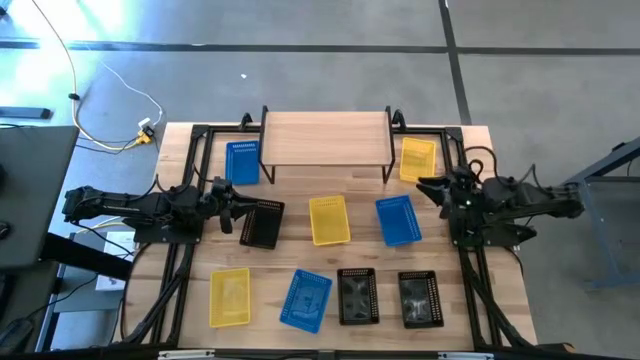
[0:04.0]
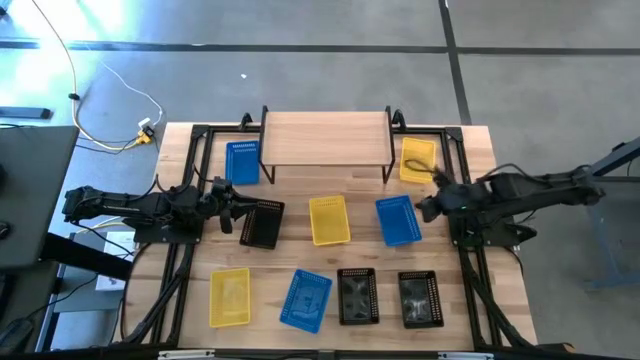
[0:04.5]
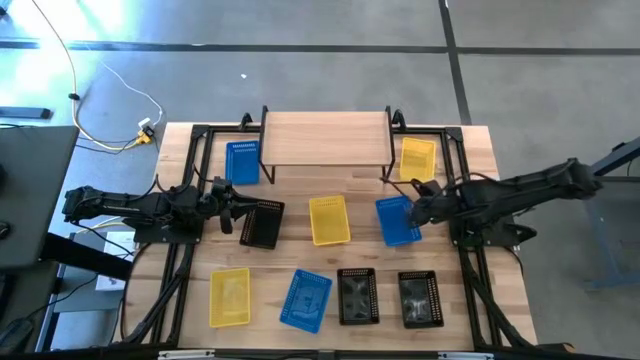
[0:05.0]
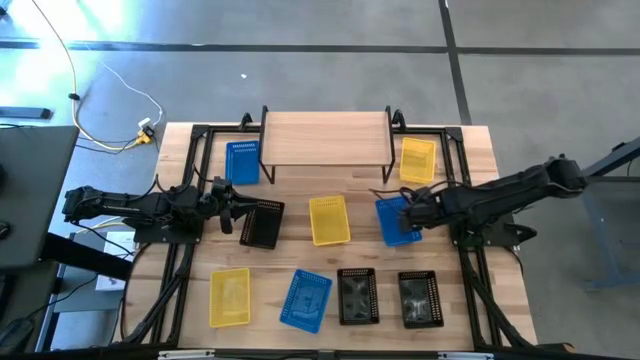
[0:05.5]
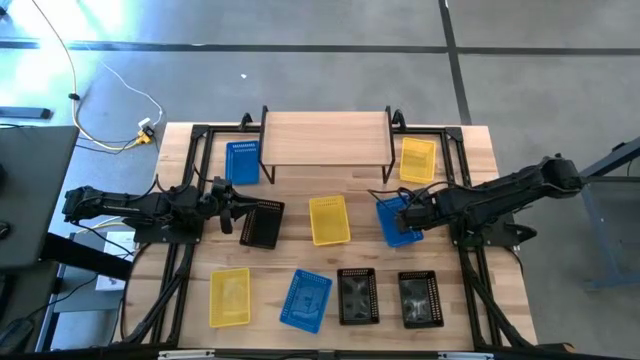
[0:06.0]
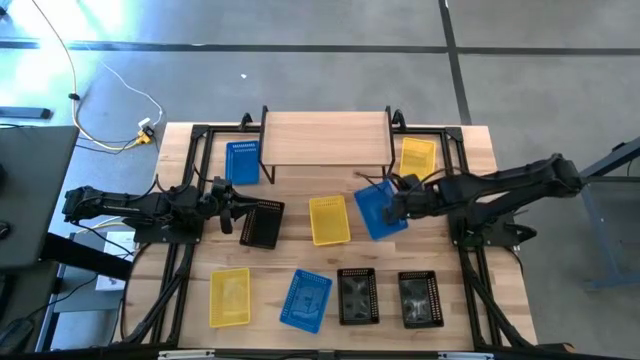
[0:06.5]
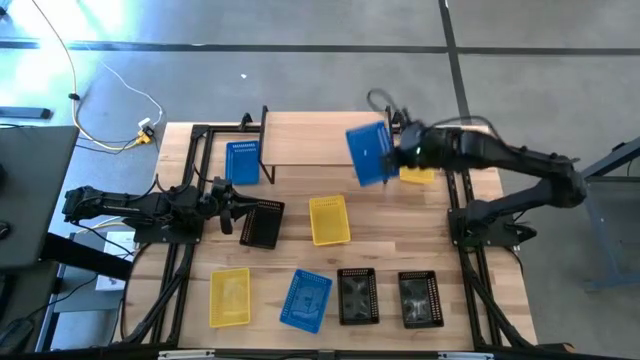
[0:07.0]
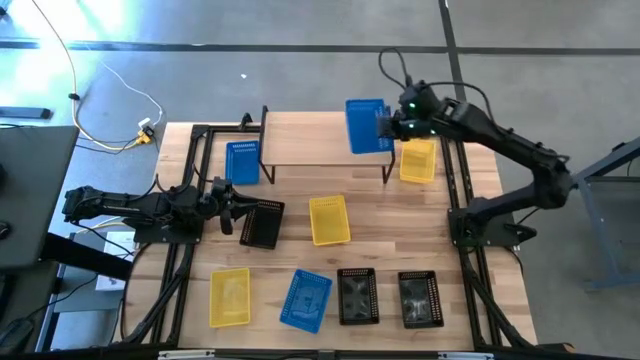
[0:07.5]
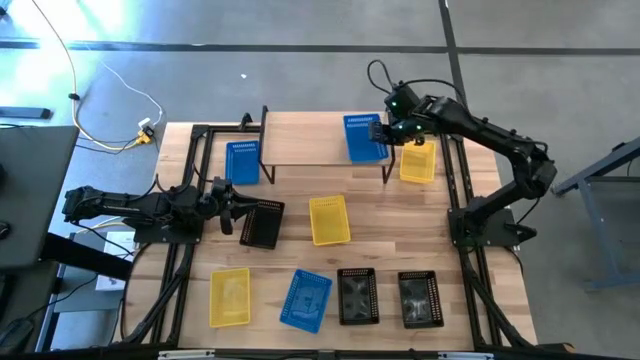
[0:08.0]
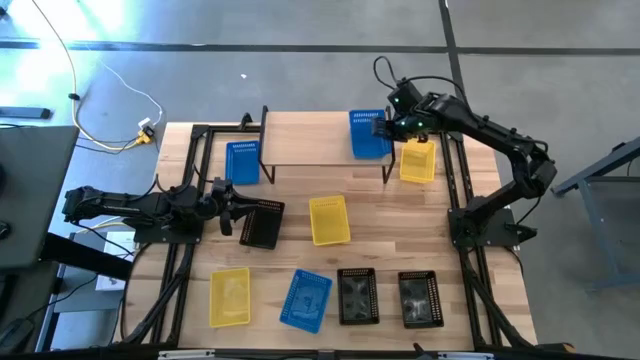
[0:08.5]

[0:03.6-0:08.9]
Task: Stack baskets on shelf by color
Put the right blue bin on the shelf

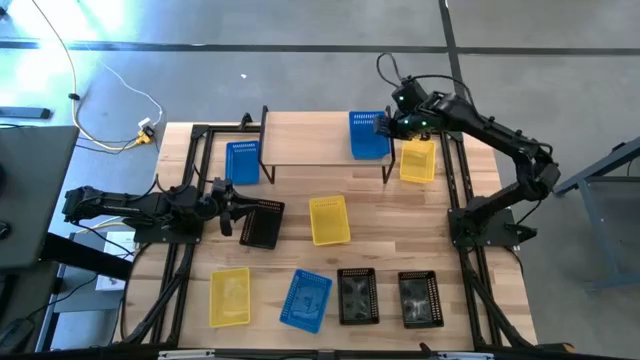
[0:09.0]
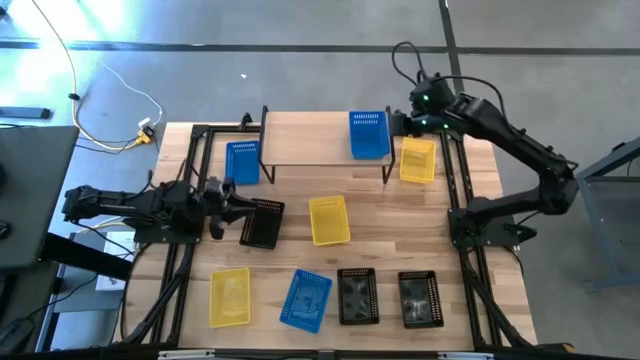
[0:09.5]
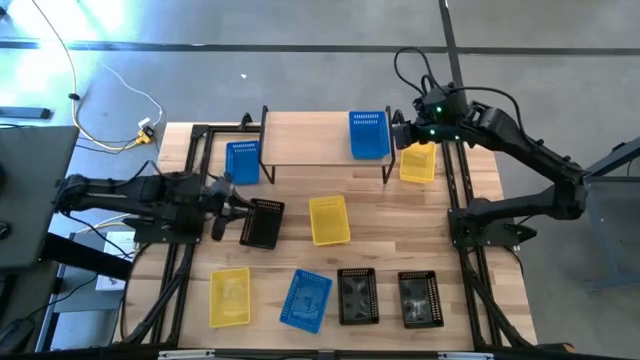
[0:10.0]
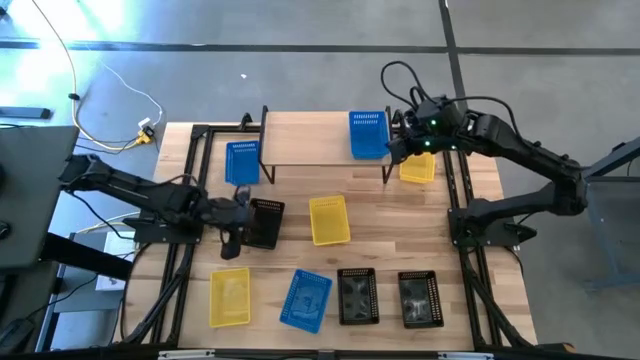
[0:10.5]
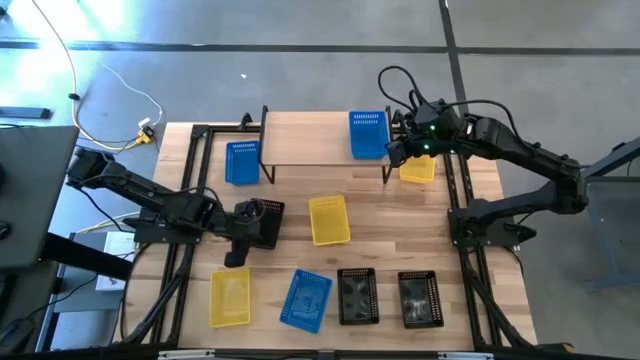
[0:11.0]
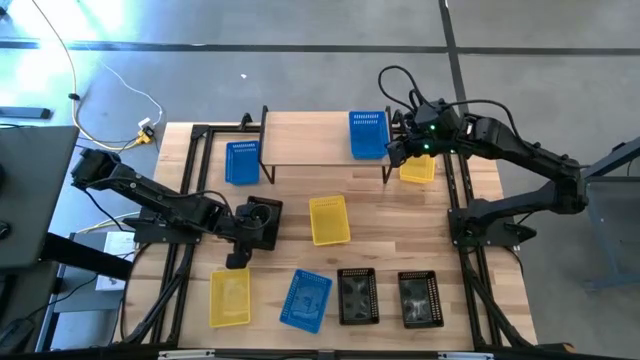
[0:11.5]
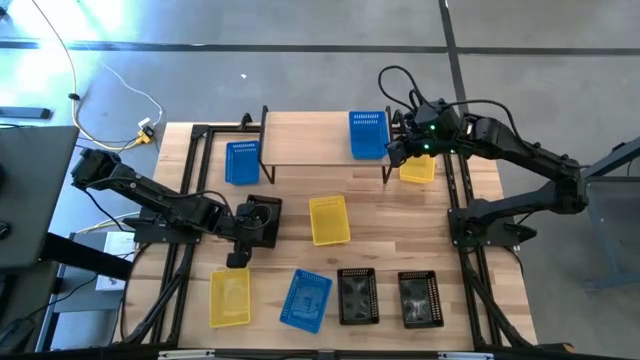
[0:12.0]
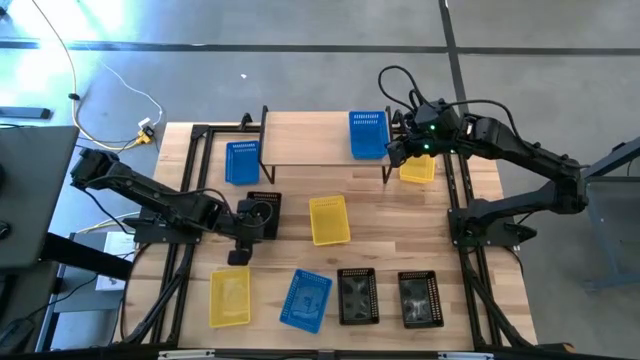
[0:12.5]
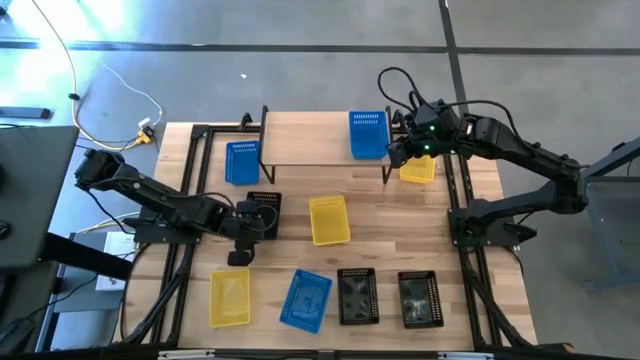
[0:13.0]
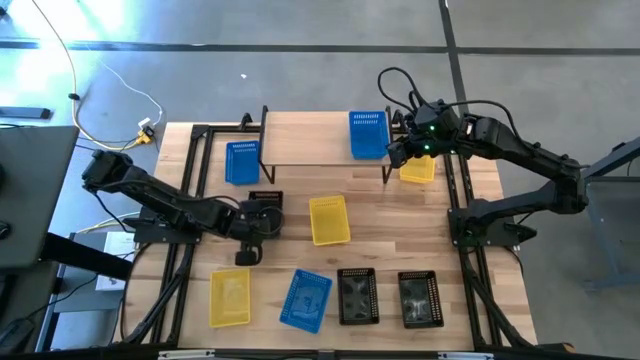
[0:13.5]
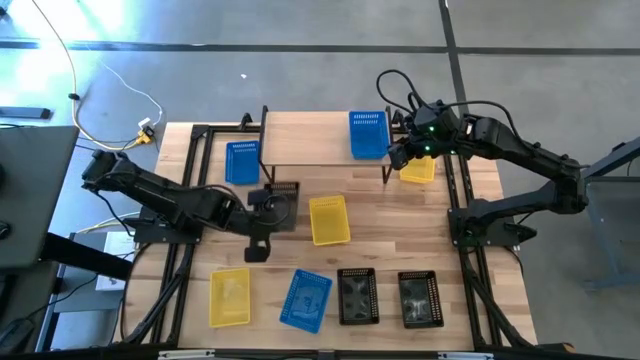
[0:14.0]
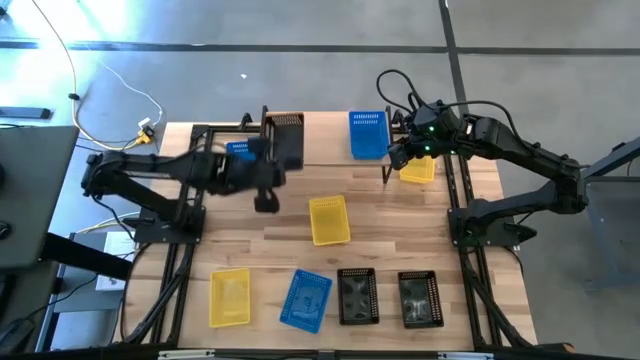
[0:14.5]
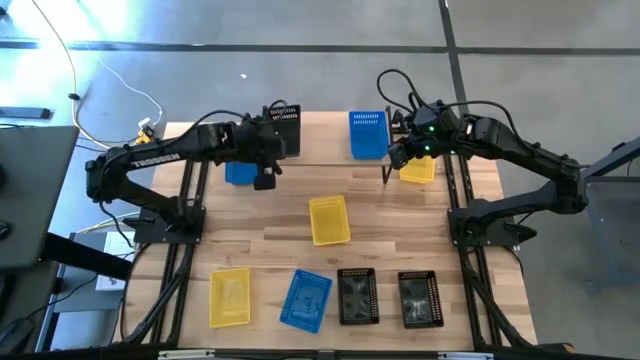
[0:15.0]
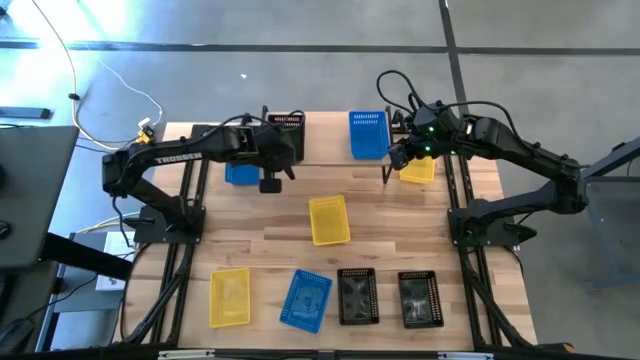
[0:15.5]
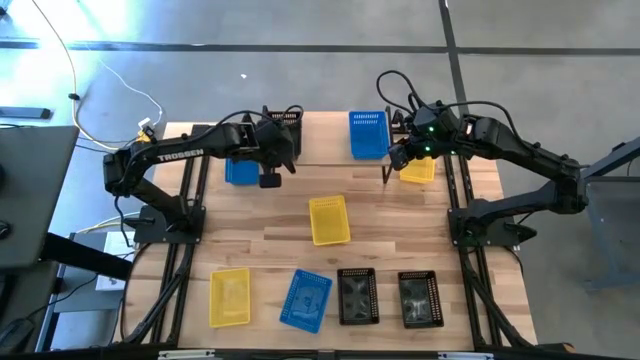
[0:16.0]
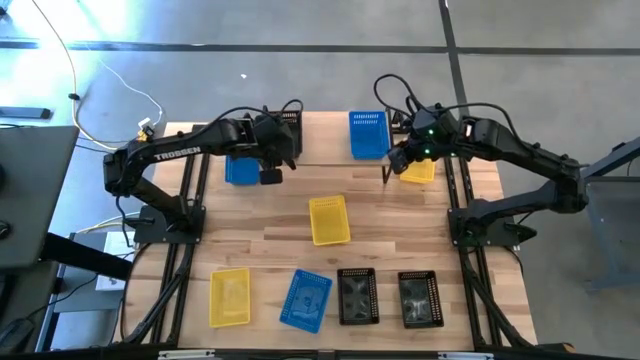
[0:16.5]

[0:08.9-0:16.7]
Put the top left black bin on the shelf

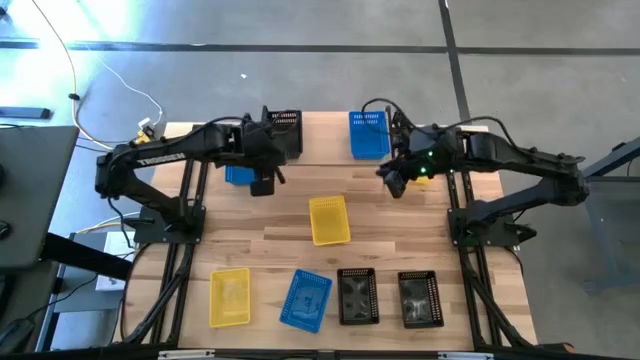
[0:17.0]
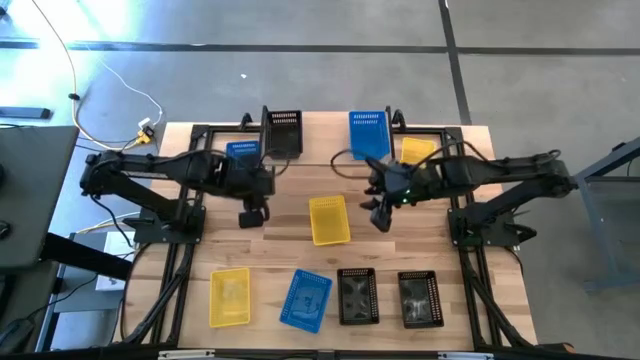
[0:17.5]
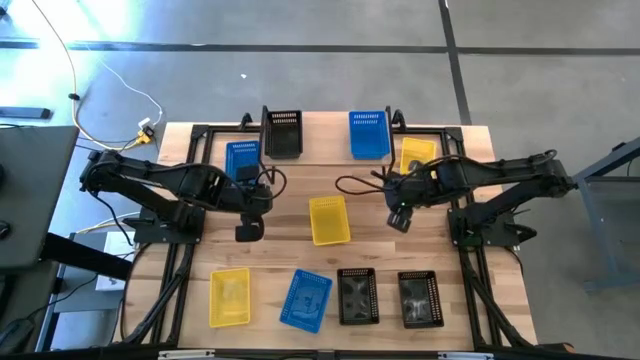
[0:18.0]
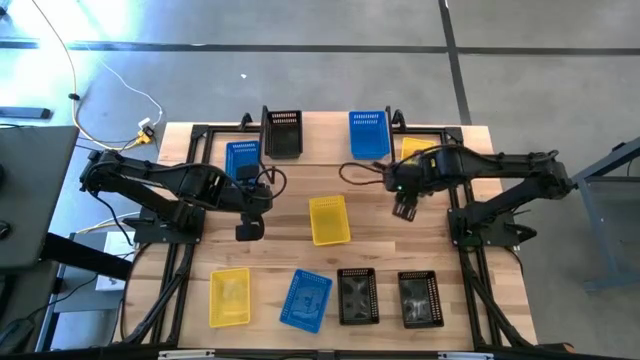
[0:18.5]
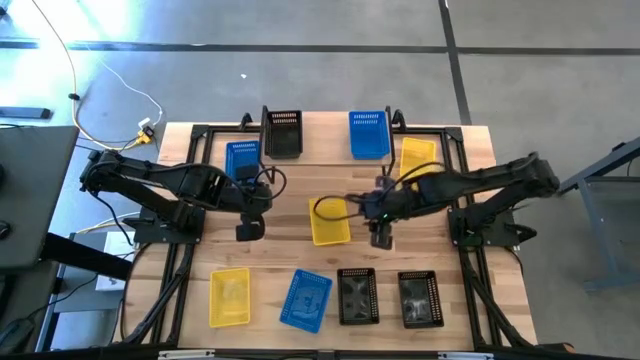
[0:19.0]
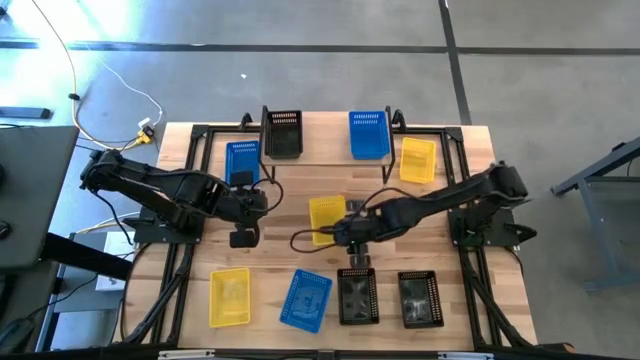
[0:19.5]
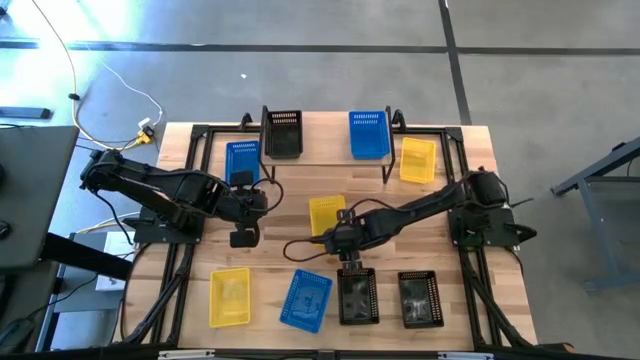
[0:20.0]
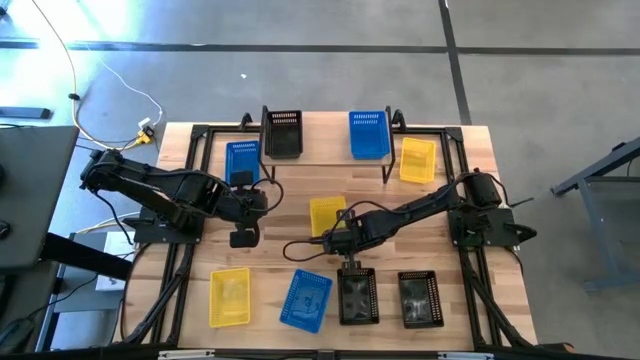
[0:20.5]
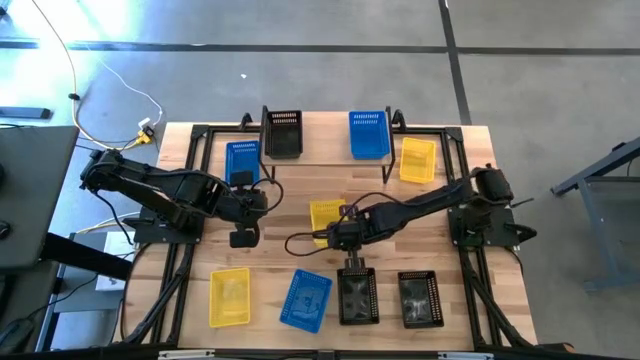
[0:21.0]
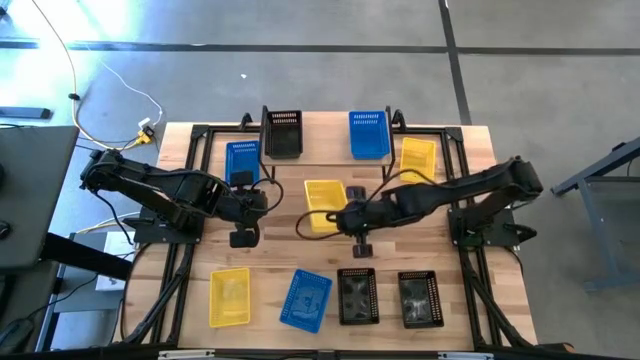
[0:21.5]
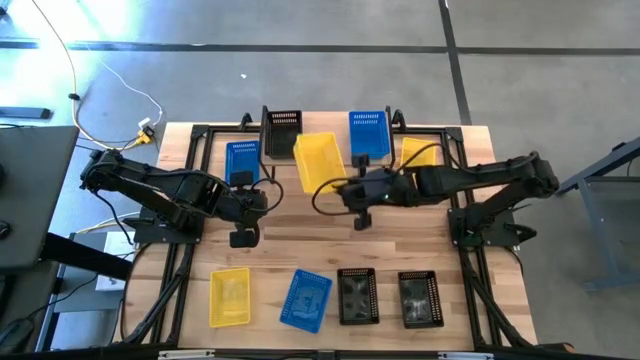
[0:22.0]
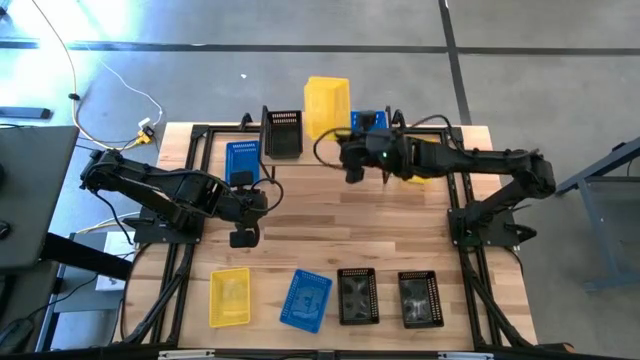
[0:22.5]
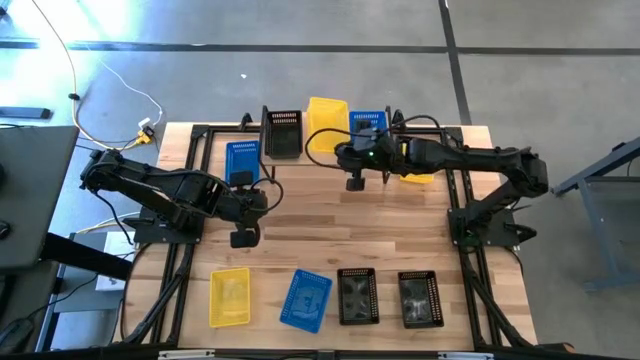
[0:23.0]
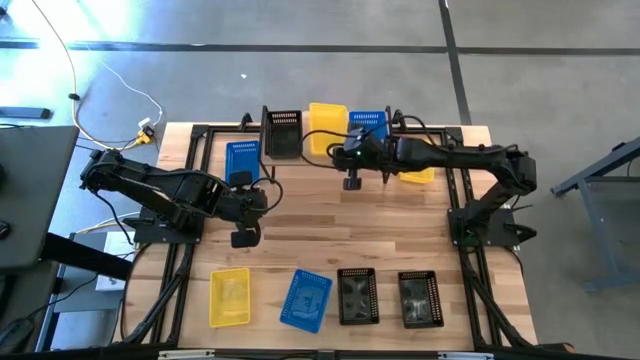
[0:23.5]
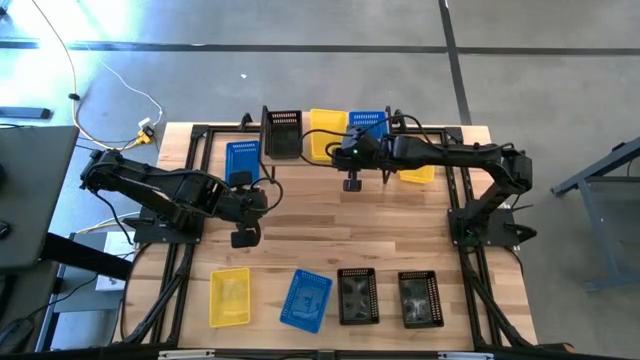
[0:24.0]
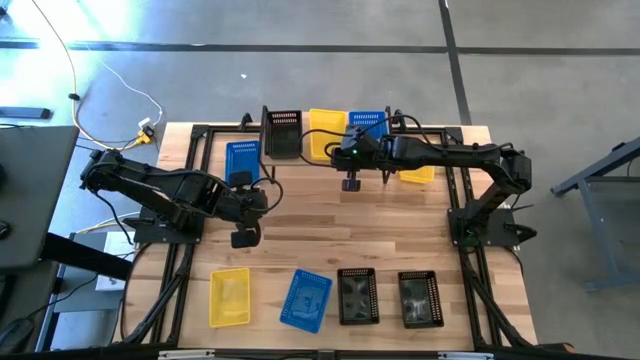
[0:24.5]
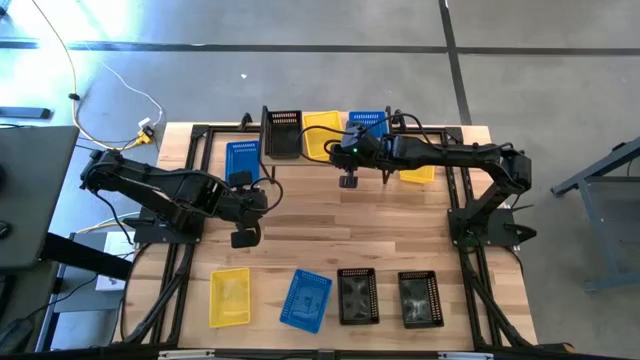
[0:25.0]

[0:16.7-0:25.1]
Put the center yellow bin on the shelf
